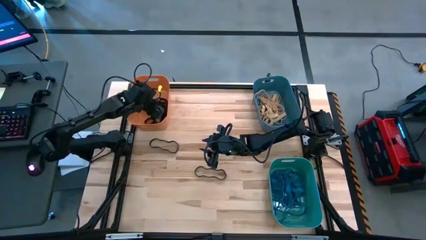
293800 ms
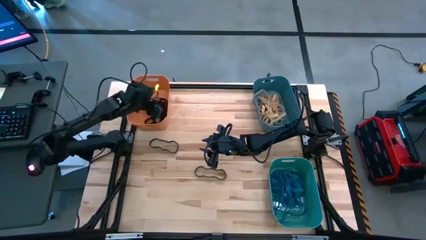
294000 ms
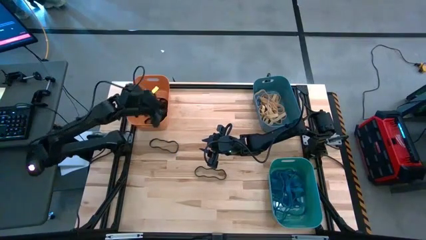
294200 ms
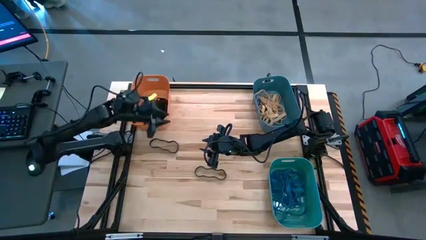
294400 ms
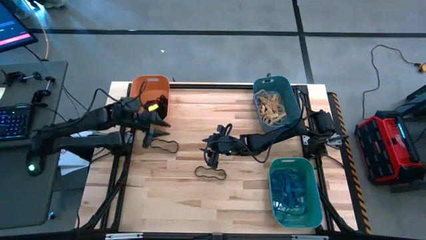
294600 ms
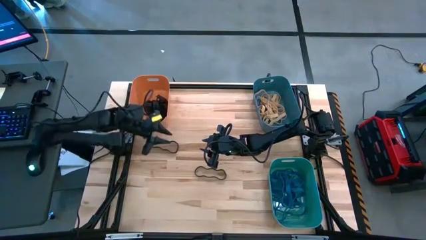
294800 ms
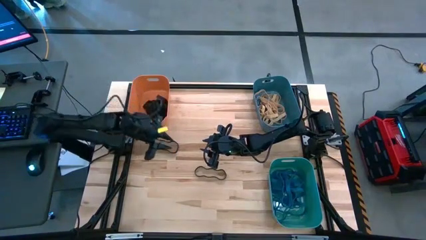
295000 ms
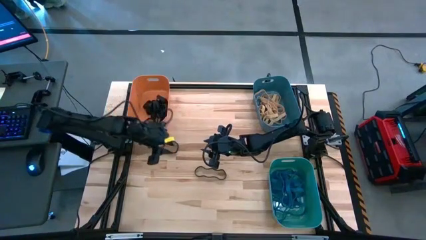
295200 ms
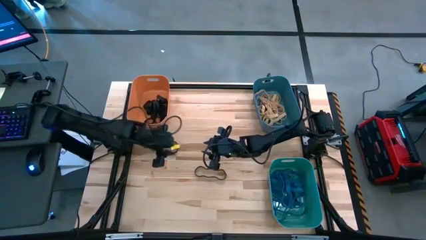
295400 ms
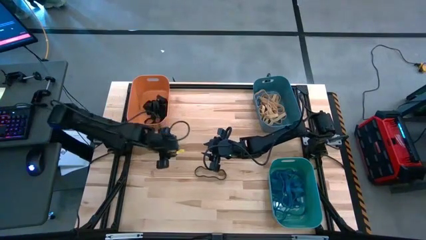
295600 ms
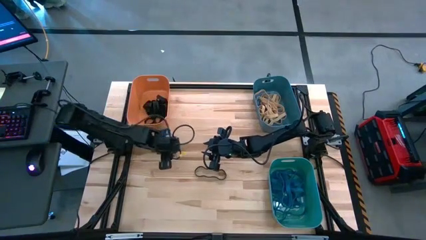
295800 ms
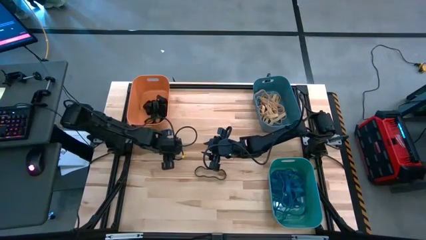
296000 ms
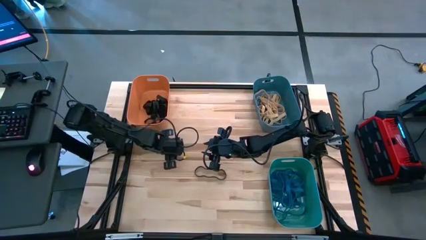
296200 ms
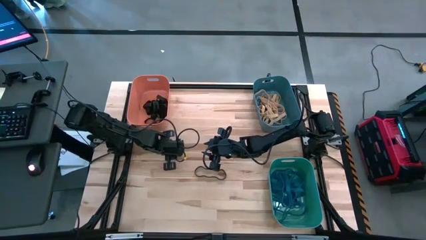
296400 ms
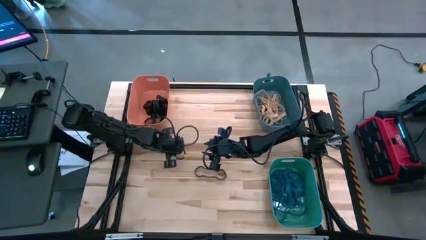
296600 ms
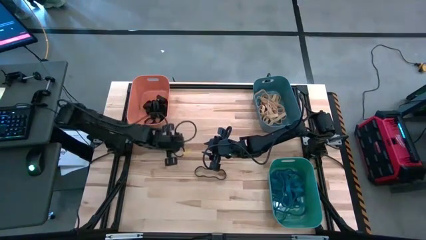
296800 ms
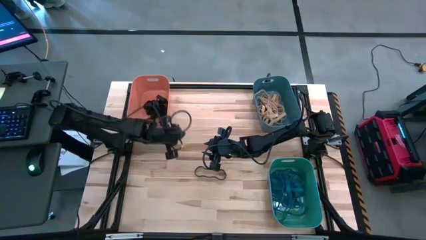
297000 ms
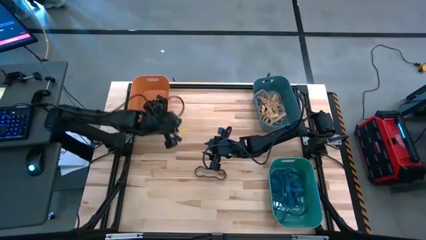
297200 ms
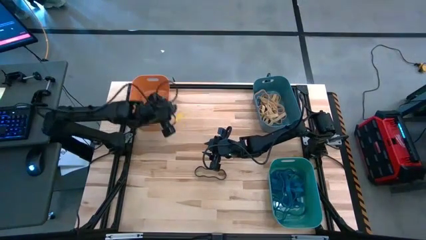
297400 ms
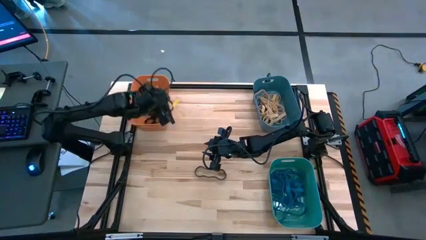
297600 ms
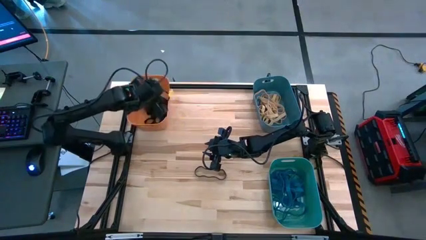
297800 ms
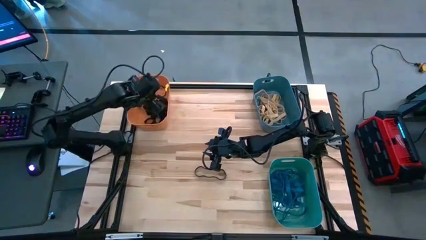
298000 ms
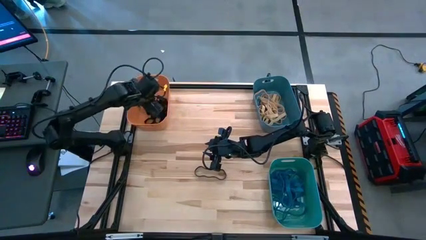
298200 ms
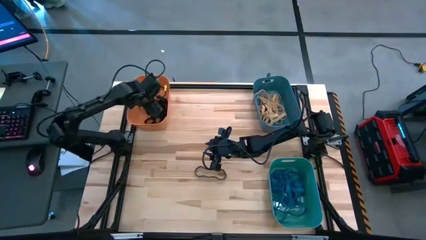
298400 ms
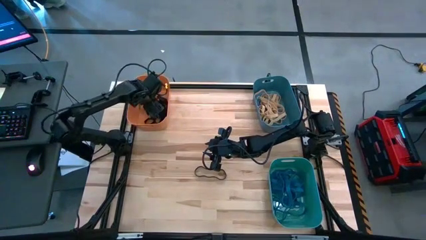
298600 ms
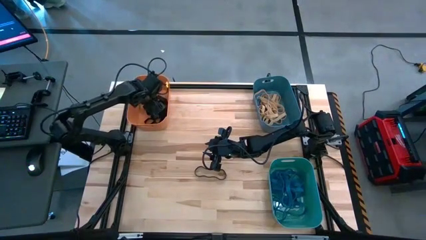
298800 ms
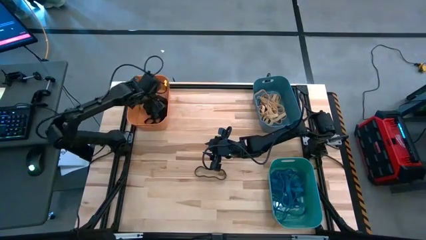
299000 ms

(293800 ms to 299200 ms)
Task: Sort rubber bands into baskets
Put the black rubber band into the orange bin

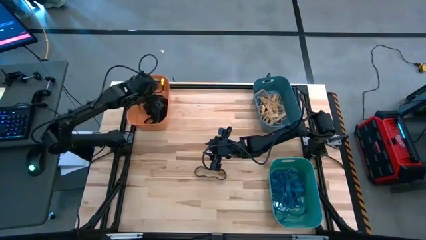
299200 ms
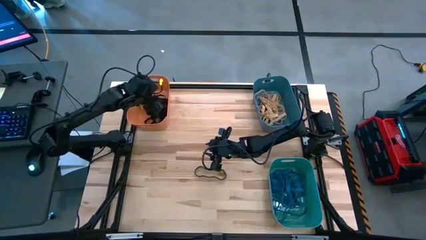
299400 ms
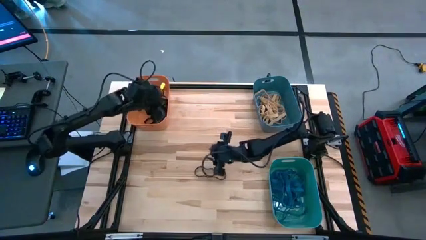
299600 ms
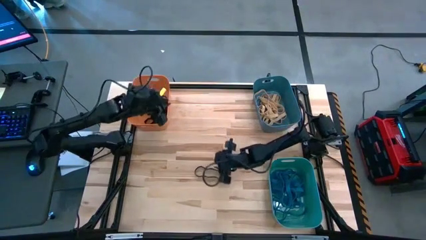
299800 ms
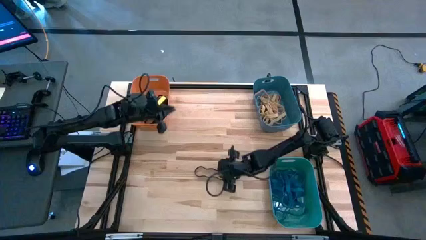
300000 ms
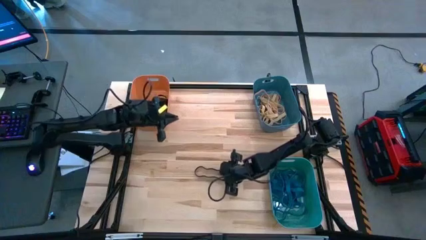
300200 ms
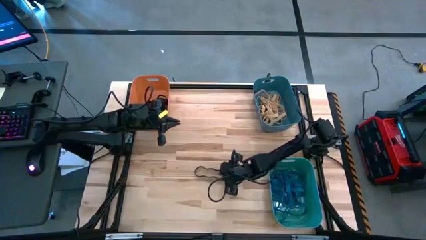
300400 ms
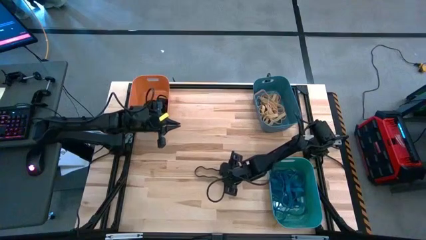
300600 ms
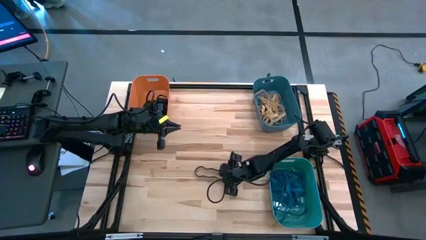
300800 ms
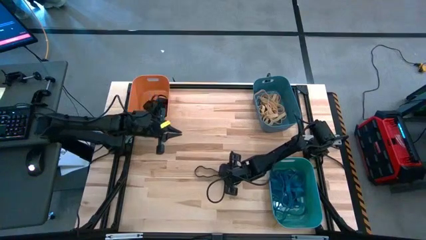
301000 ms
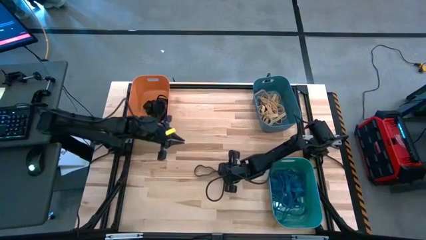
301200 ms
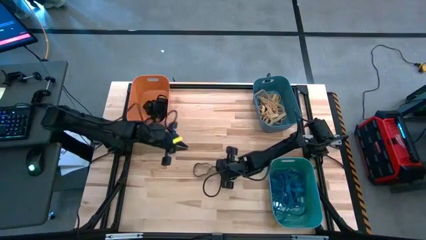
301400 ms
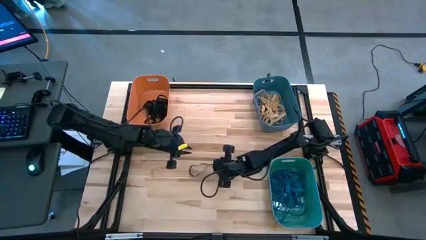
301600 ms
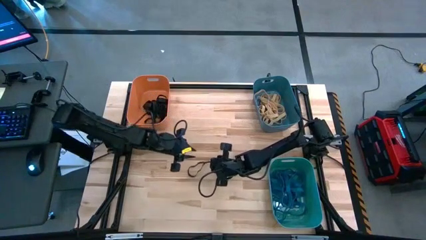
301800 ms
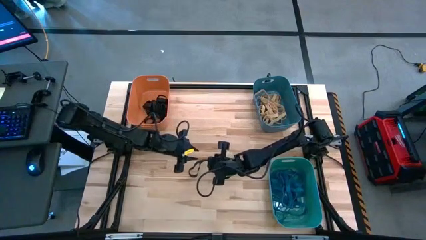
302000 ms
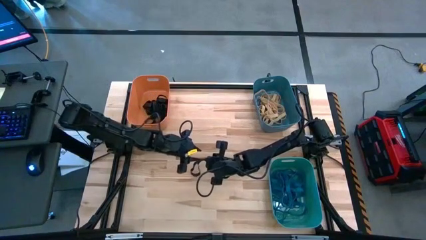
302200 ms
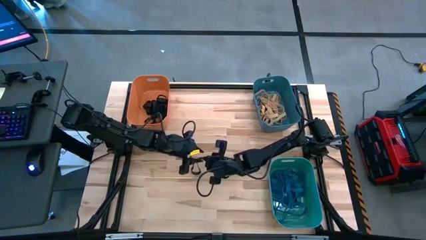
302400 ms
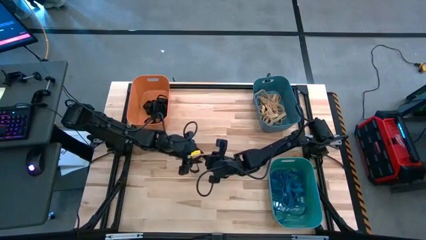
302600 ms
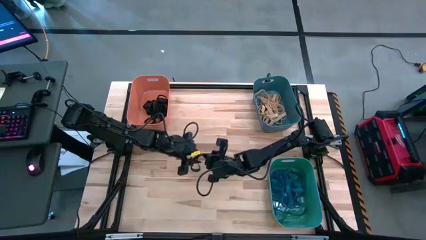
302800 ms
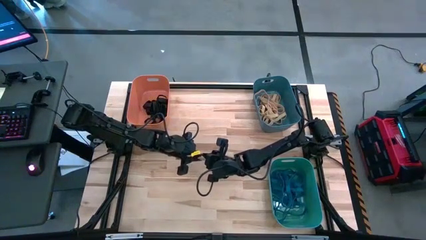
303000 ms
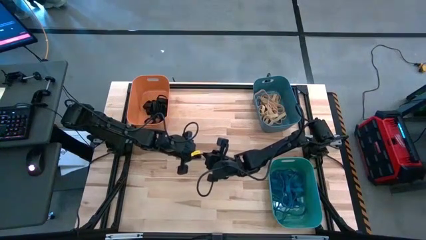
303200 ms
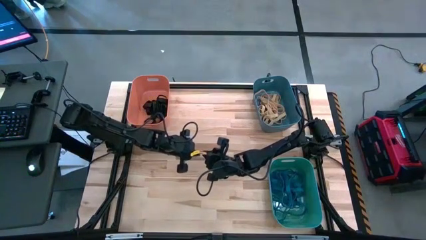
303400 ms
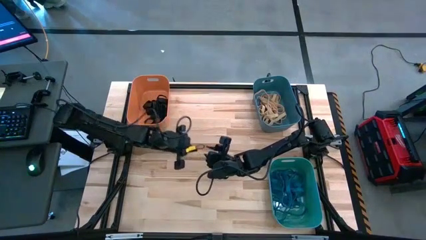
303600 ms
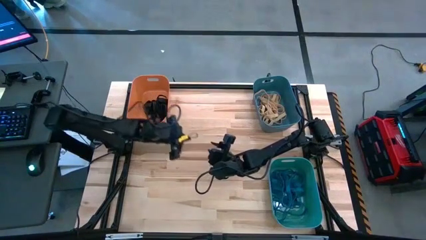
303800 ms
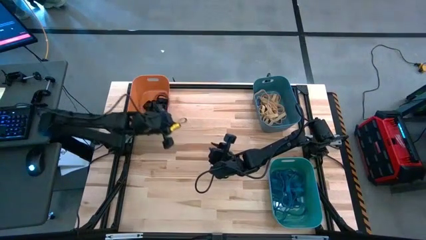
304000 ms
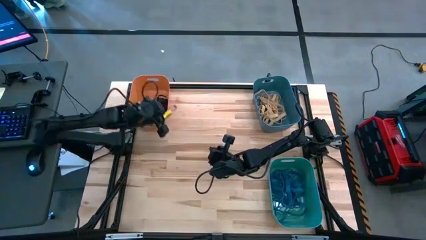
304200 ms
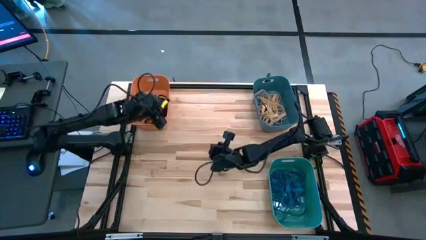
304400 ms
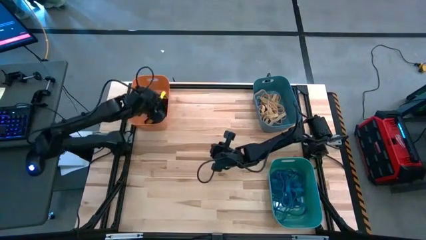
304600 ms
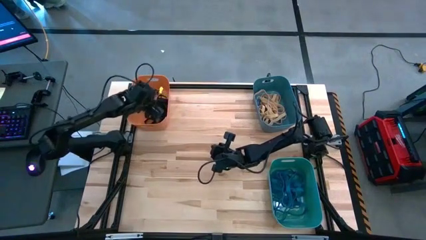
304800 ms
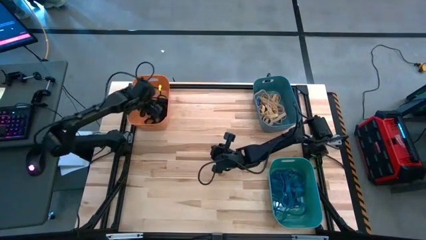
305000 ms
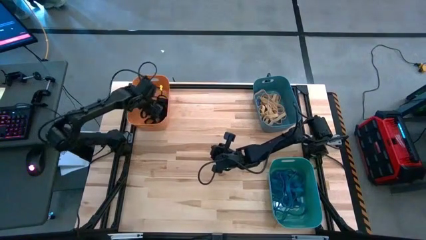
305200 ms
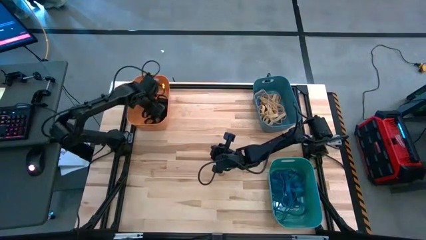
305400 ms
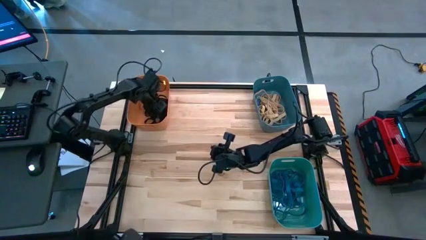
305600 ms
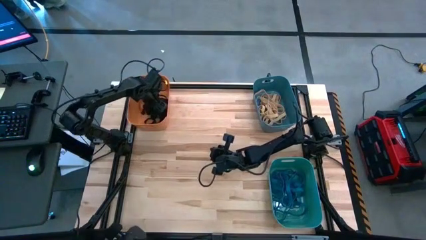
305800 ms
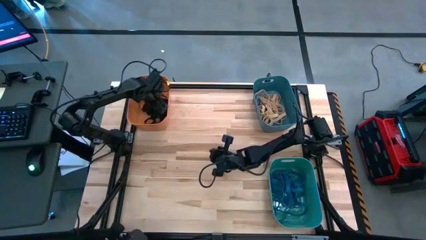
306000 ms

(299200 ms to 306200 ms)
Put the black rubber band into the orange bin

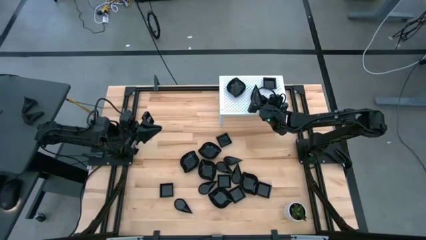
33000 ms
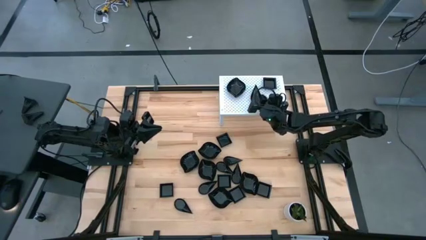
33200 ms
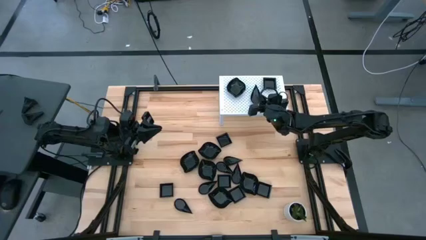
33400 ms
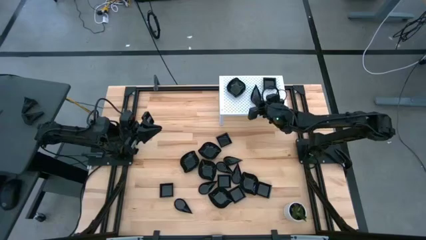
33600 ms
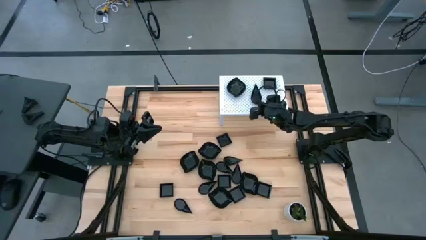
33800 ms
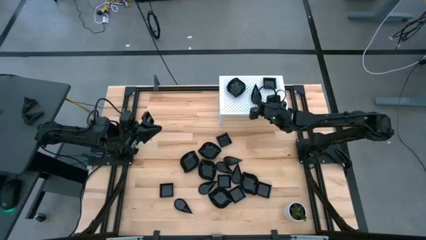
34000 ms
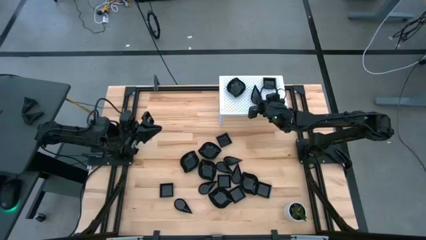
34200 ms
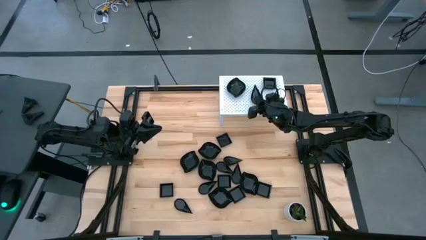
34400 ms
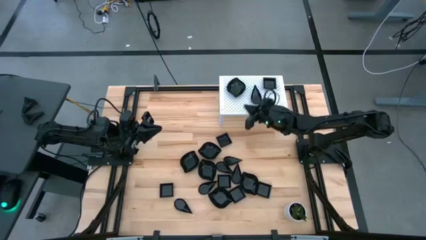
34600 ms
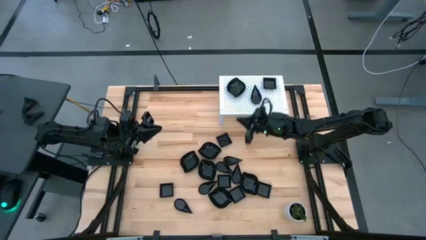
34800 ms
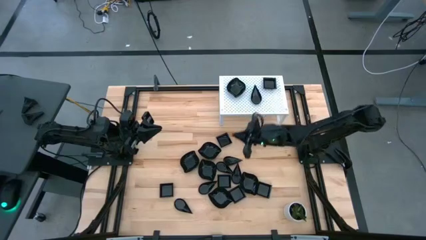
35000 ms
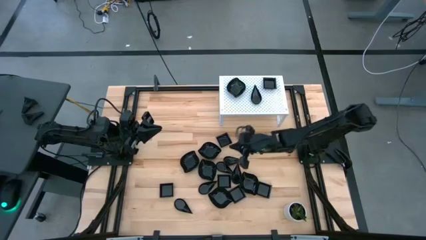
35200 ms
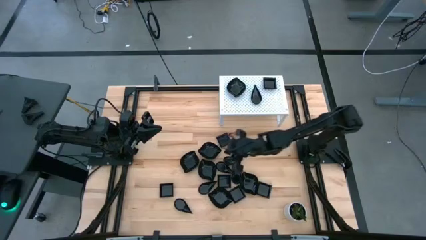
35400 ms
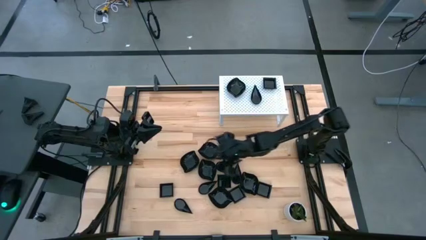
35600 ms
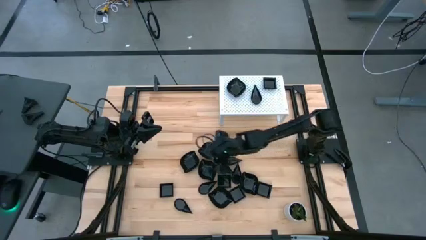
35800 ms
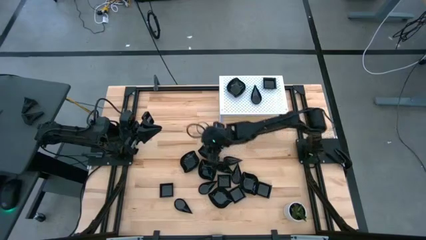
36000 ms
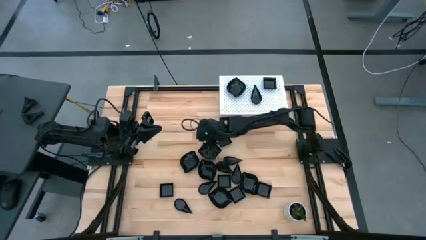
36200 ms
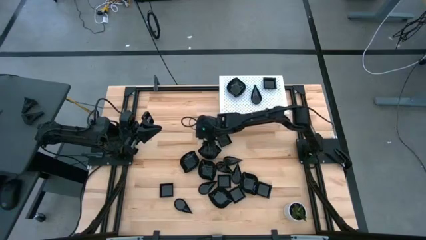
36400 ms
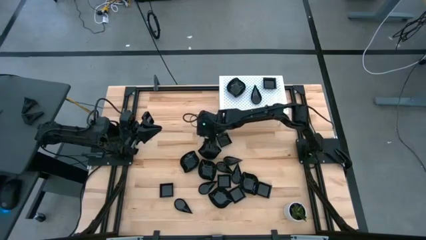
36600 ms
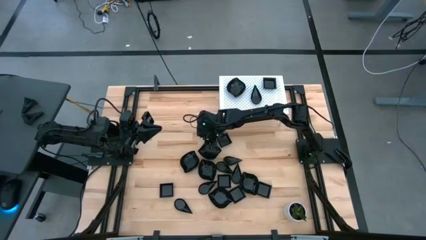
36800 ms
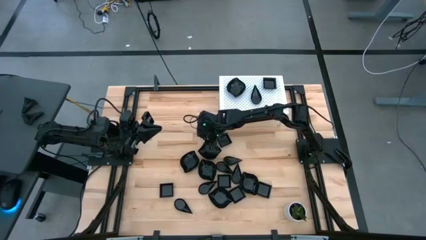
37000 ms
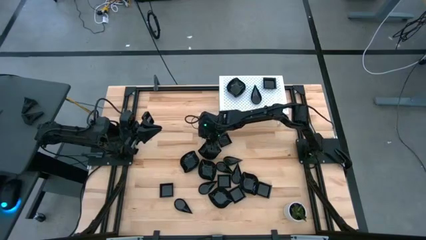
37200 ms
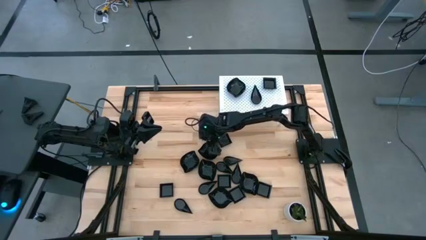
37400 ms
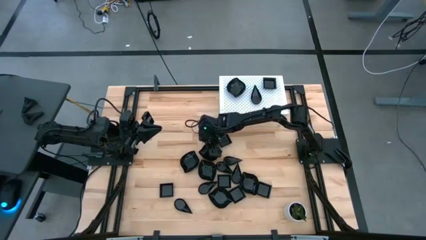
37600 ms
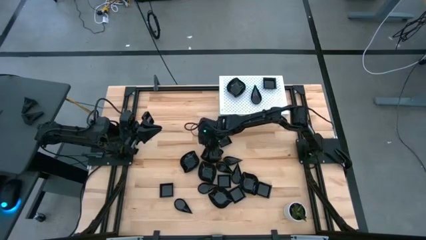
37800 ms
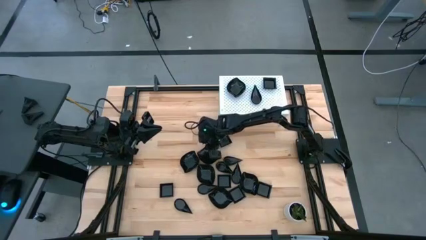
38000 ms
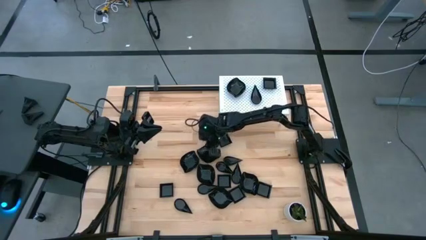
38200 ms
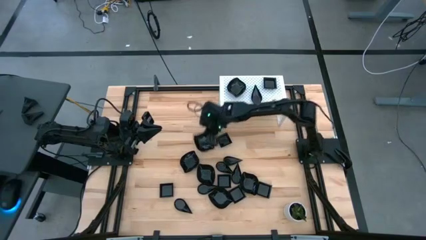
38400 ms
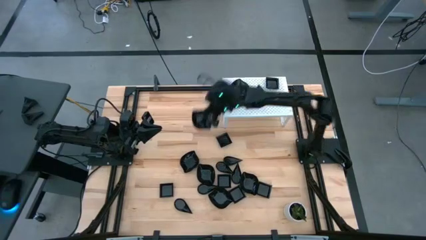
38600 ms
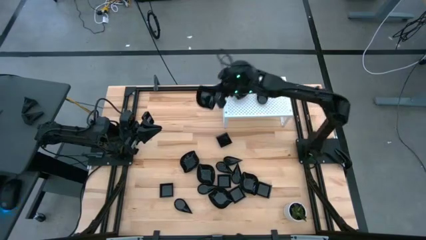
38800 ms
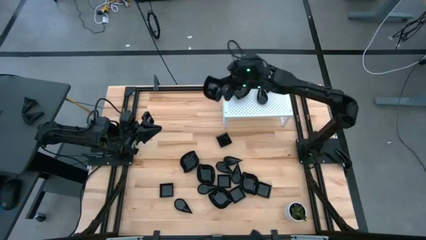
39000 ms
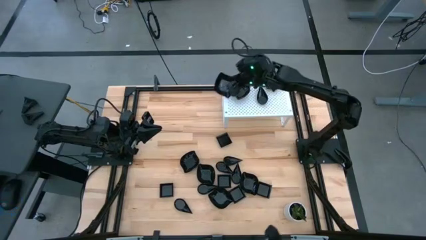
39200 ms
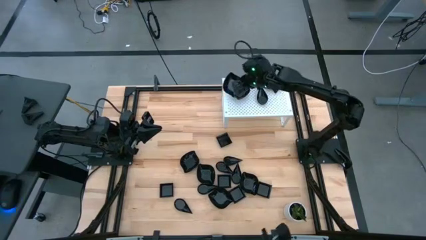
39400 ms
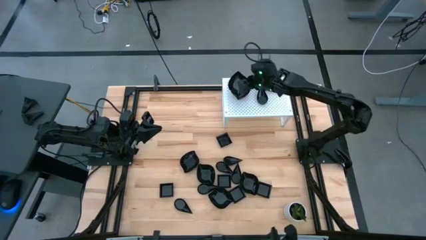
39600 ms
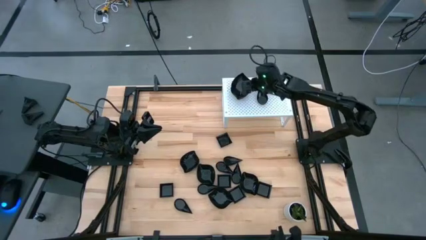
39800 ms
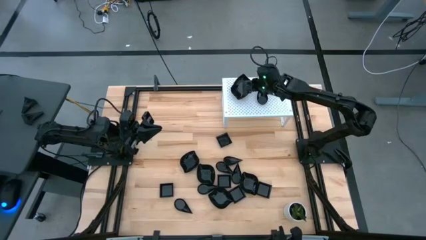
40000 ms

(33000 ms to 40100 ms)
Task: Pick & Place Mini shaped plates
Stack the leaf shaped plate on top of the leaf shaped plates on the shelf
